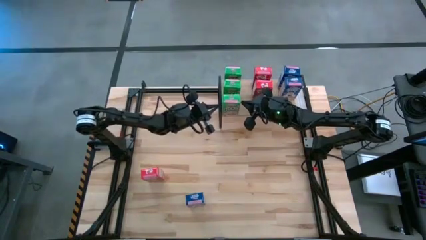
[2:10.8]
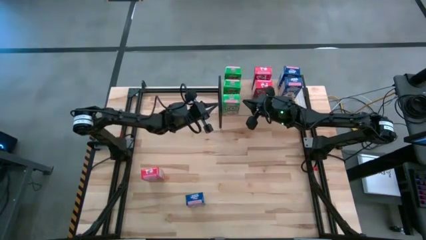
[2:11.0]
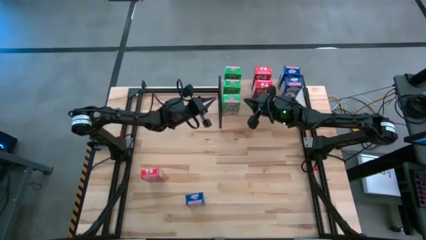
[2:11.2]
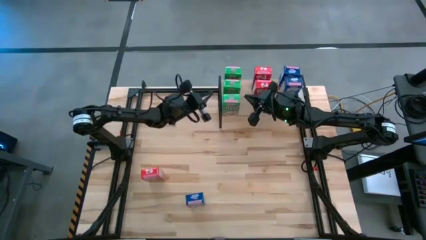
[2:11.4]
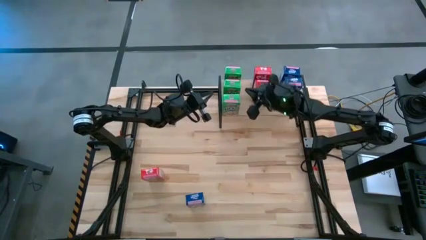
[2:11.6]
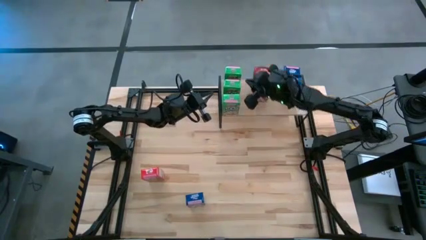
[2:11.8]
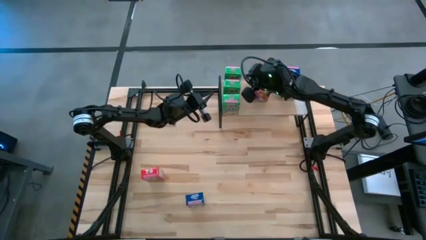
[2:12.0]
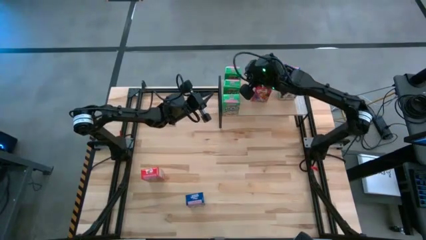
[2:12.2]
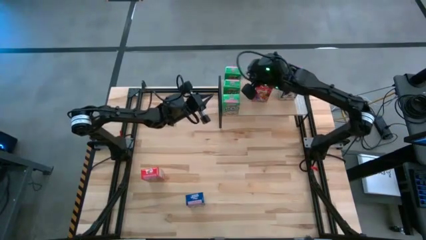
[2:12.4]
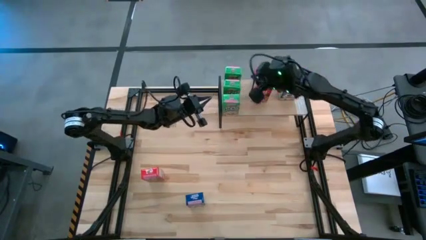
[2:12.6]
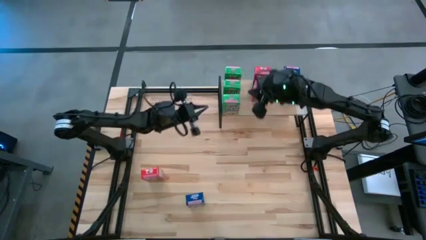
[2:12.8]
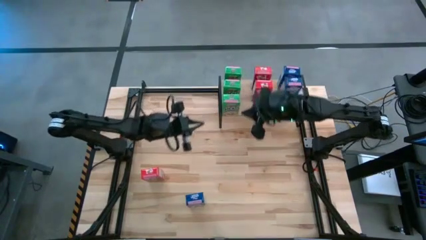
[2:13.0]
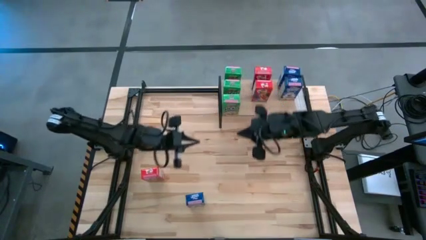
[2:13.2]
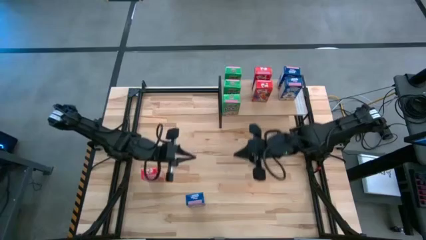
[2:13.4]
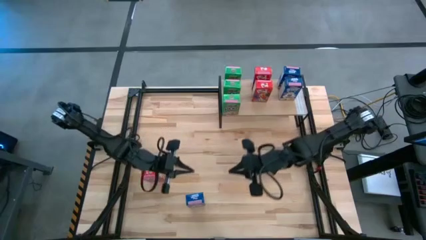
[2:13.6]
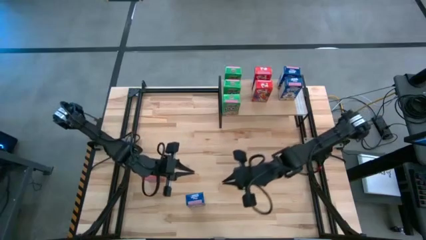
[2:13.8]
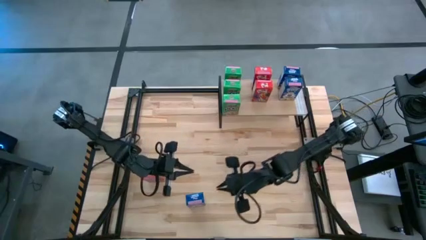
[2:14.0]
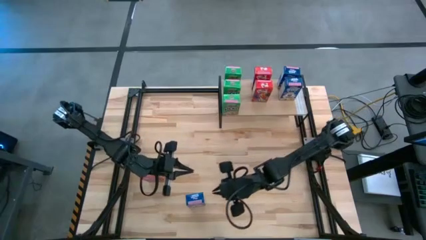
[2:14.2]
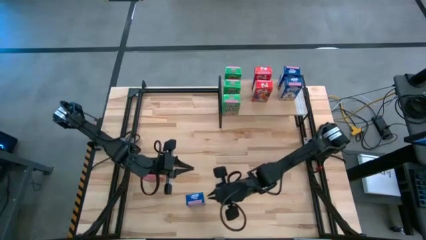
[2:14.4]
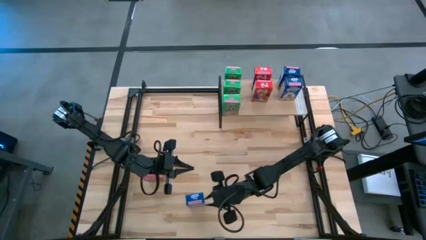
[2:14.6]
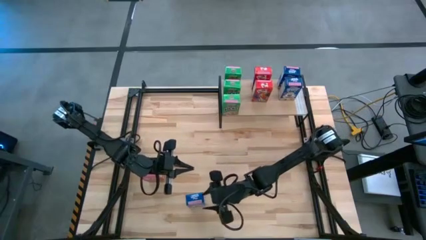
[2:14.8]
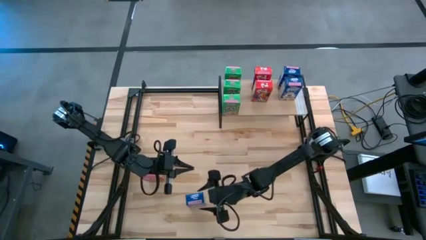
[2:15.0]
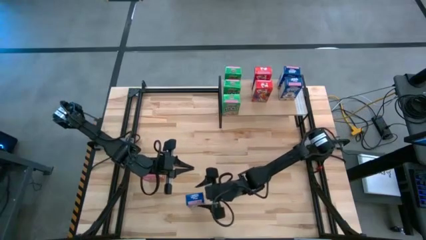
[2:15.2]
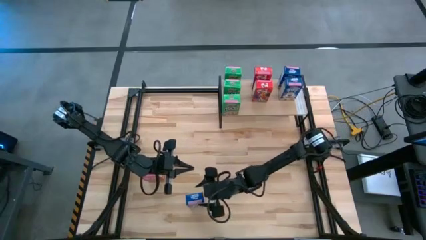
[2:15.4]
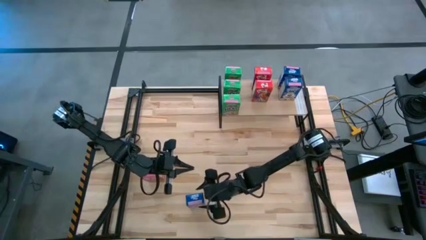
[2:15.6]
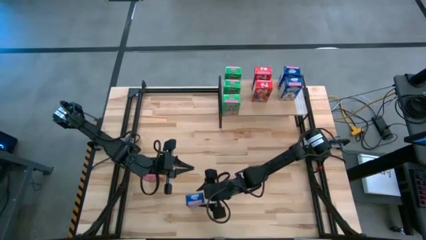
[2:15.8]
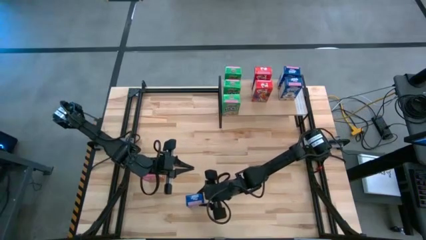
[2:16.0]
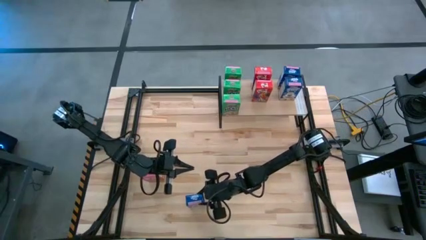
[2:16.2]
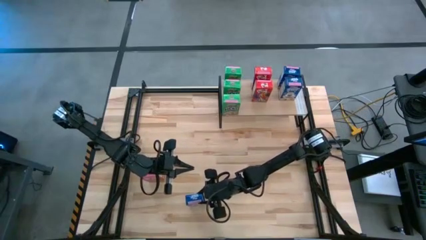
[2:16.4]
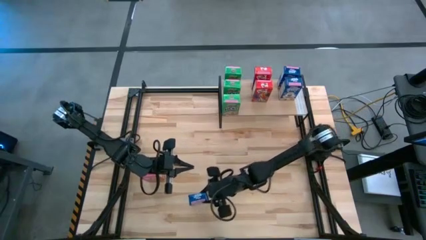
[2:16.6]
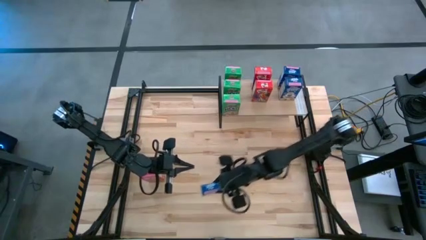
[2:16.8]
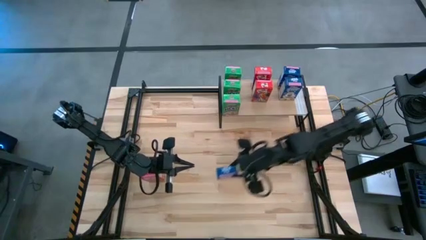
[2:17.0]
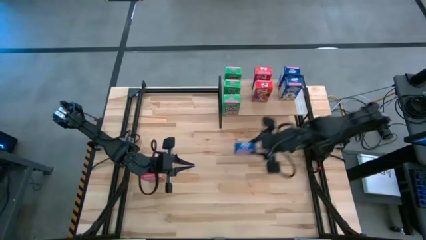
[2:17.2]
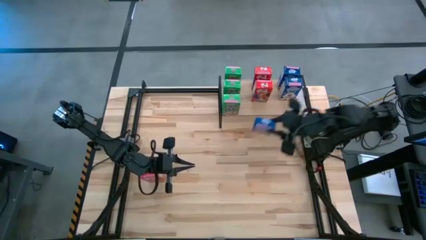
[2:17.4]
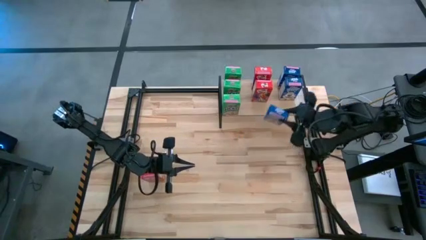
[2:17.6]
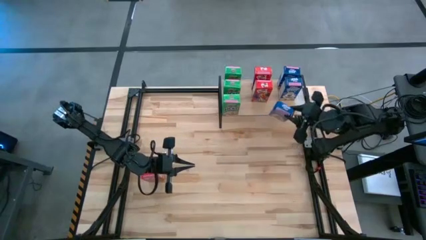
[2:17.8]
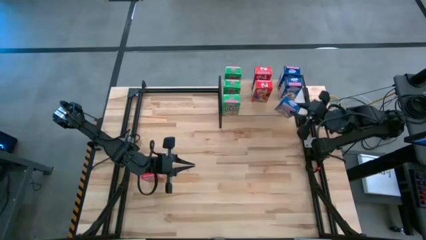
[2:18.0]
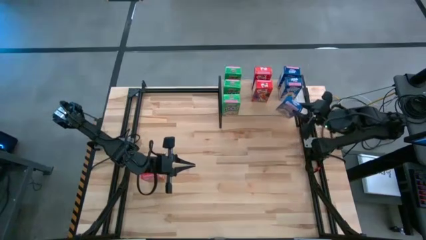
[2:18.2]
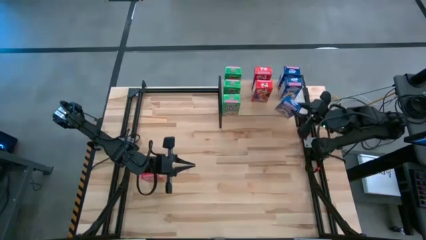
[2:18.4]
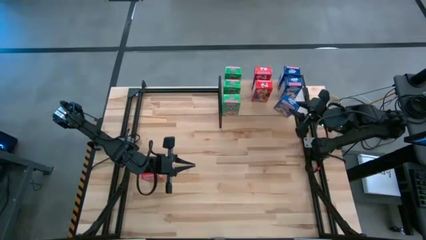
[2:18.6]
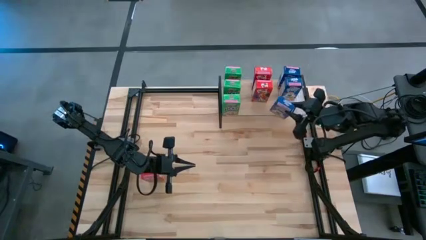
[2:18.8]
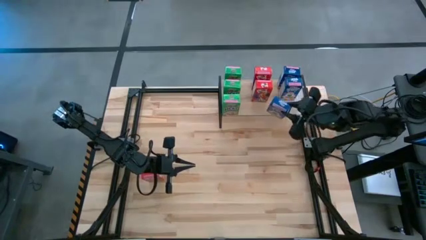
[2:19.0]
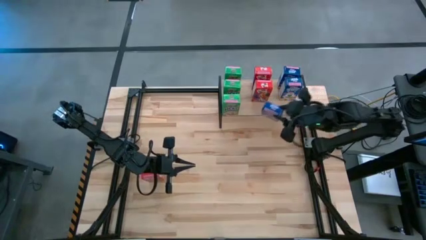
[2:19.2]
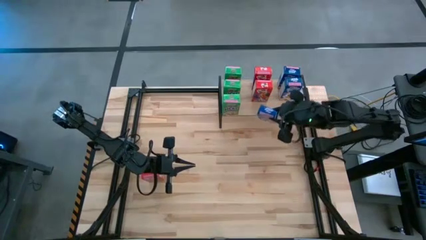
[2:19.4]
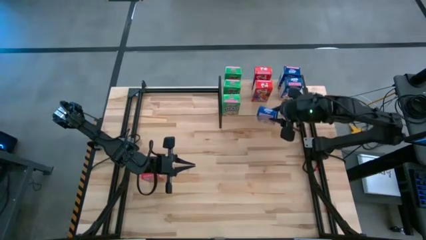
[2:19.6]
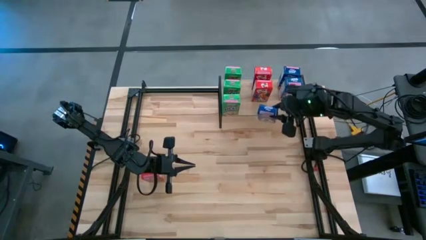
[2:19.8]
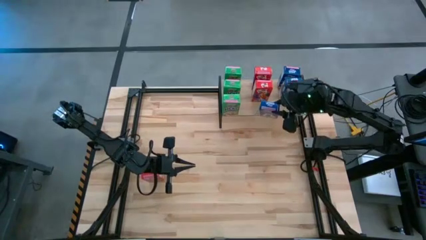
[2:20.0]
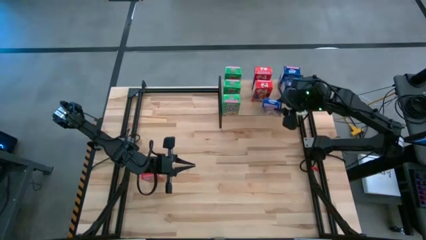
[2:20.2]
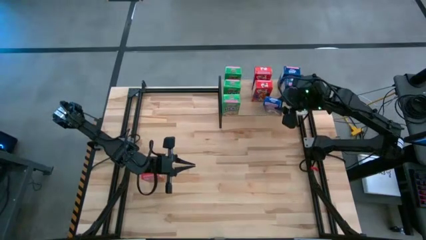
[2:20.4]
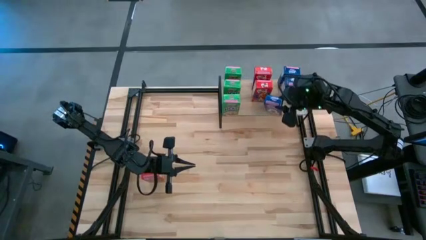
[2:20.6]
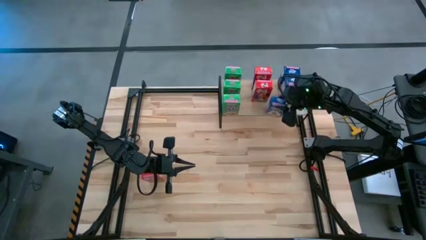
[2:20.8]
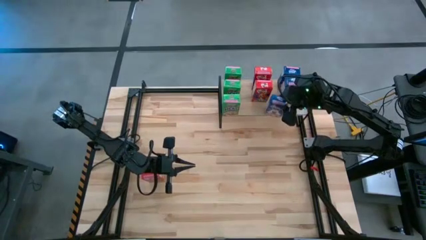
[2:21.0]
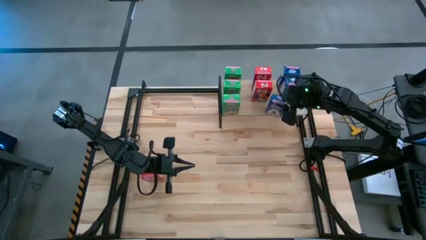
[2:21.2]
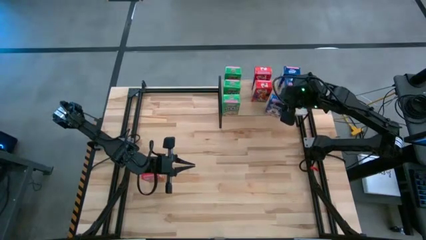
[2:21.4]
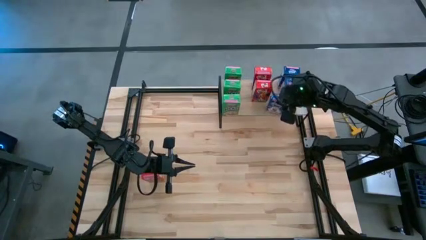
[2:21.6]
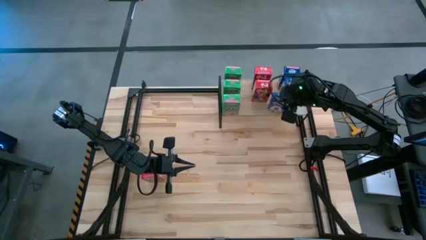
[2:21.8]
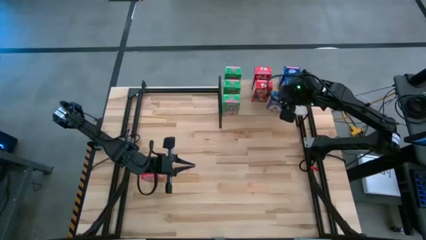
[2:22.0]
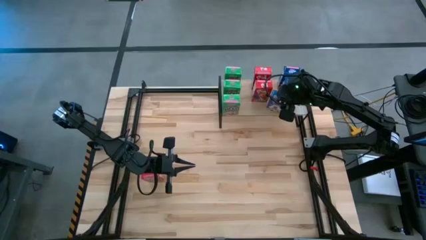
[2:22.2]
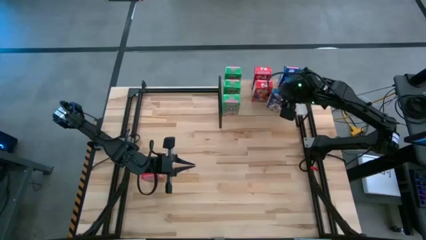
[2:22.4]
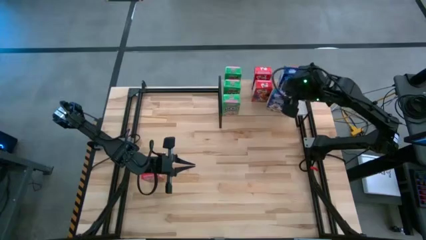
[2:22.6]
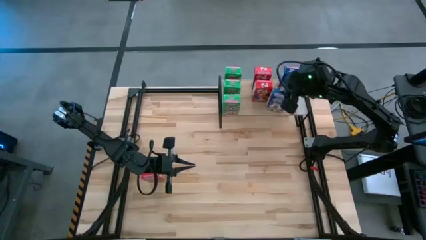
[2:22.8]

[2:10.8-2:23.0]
Task: Stack cereal on shelf
Put the blue cereal box on the shelf aligned with other blue cereal boxes

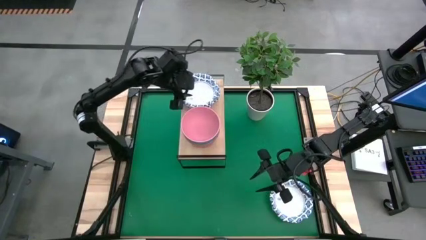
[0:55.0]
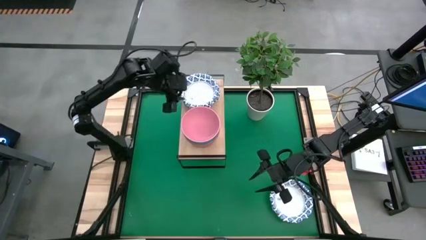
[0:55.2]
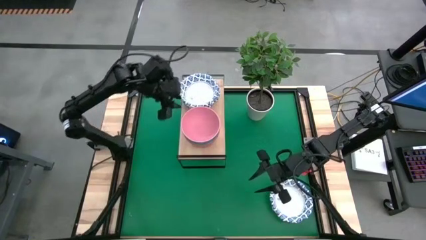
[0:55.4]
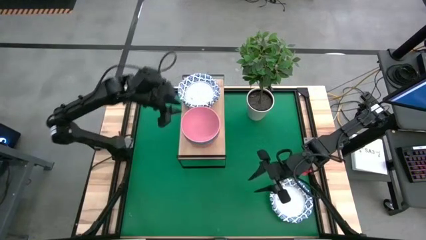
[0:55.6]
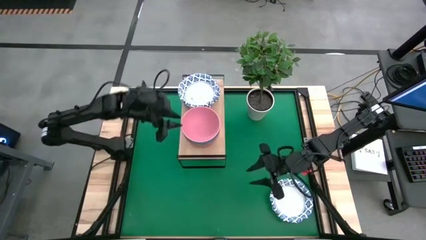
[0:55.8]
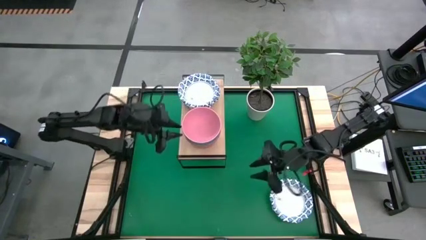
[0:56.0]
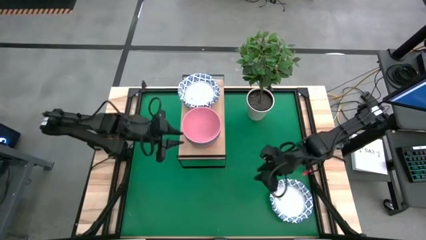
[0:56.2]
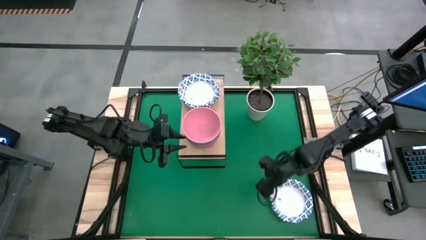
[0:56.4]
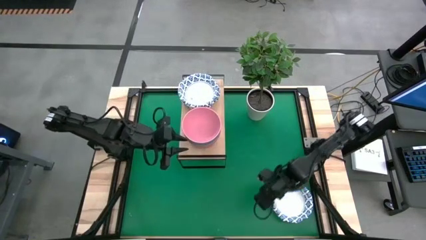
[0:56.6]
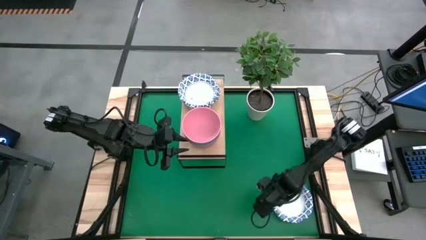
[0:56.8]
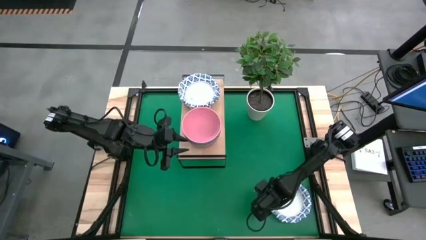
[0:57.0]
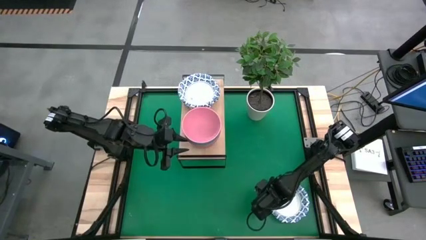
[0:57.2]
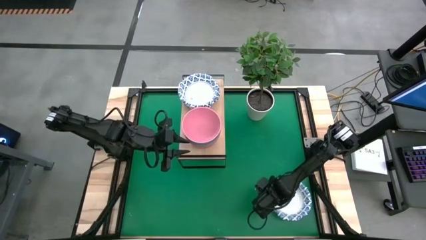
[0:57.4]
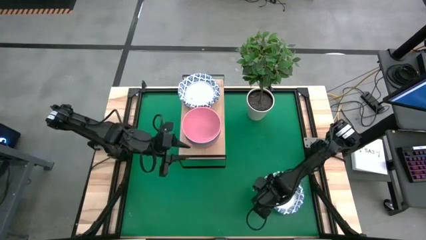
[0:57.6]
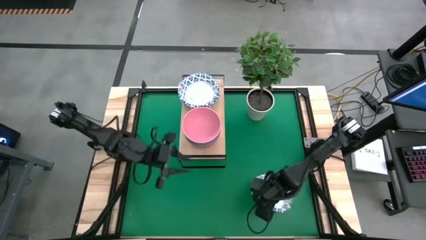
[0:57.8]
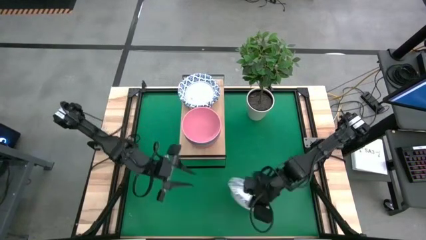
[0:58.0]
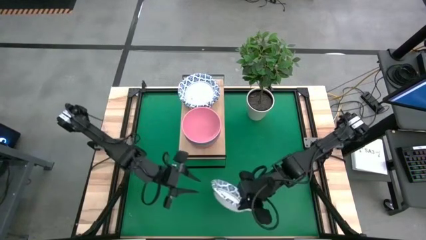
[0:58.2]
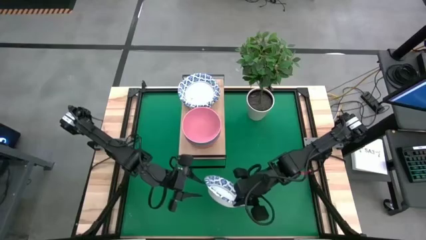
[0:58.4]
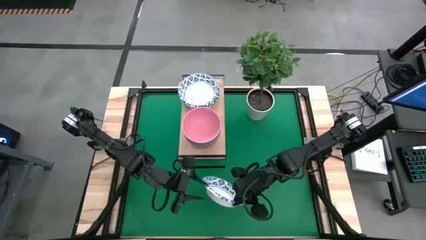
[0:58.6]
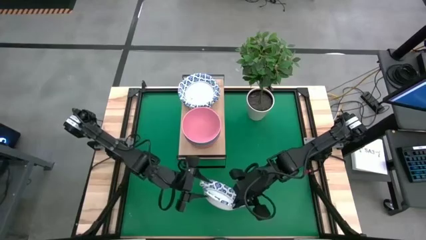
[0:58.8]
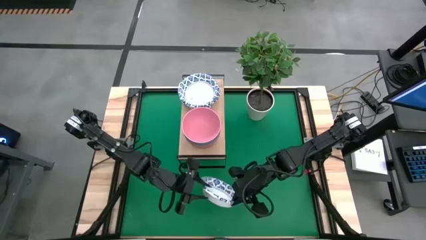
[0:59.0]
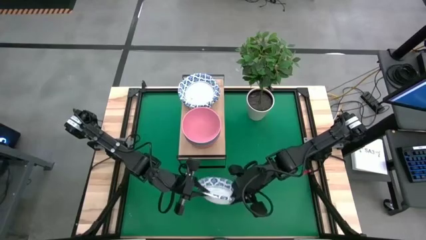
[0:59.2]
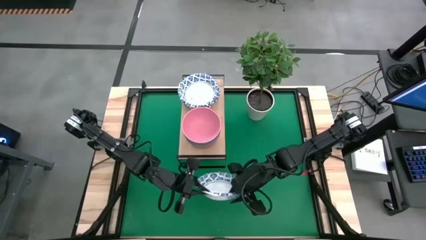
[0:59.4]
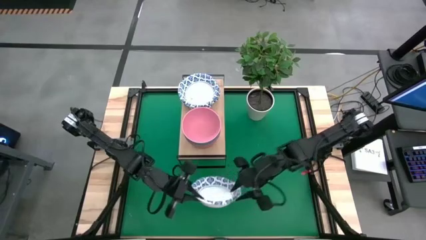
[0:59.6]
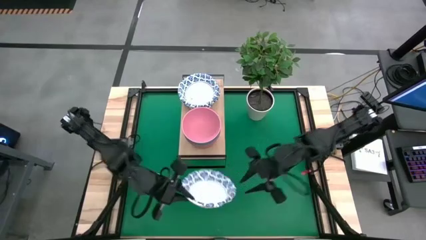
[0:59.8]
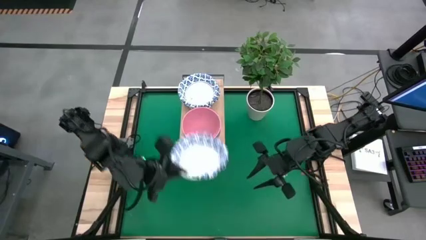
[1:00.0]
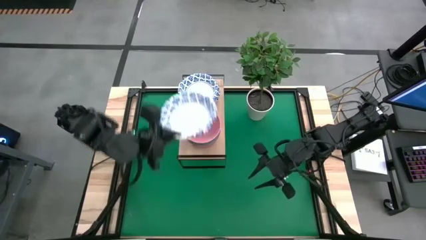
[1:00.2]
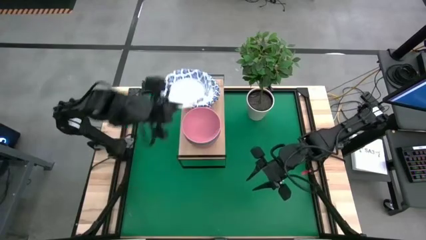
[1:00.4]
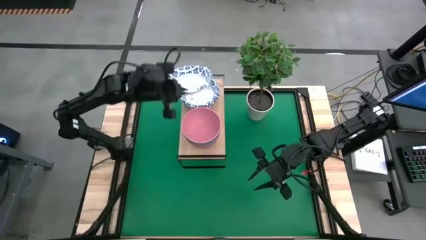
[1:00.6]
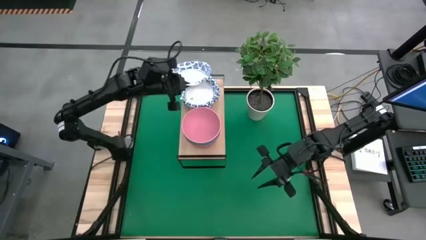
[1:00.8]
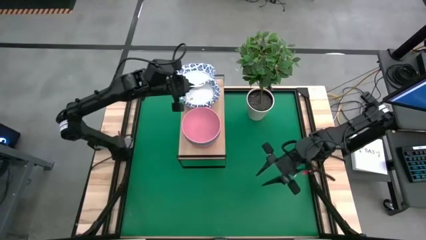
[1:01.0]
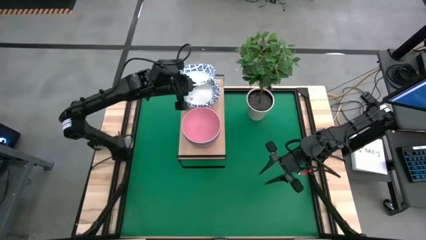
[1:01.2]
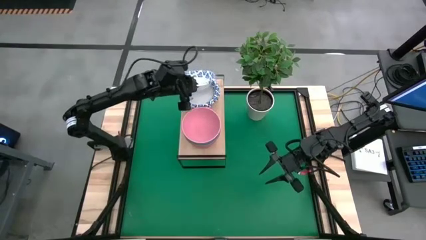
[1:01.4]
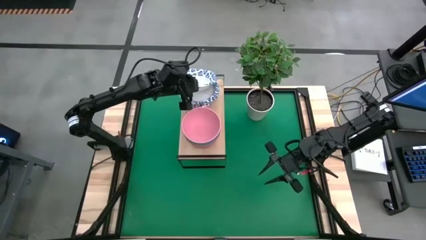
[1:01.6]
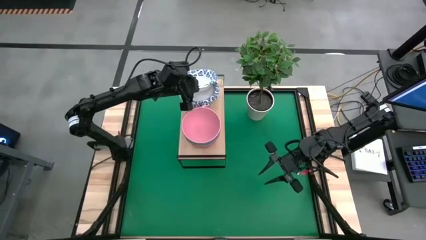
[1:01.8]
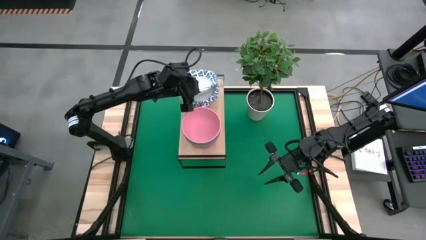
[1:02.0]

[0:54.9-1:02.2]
Task: Place and stack bowls onto a shelf
Stack the white patterned bowl on top of the other white patterned bowl on the shelf
